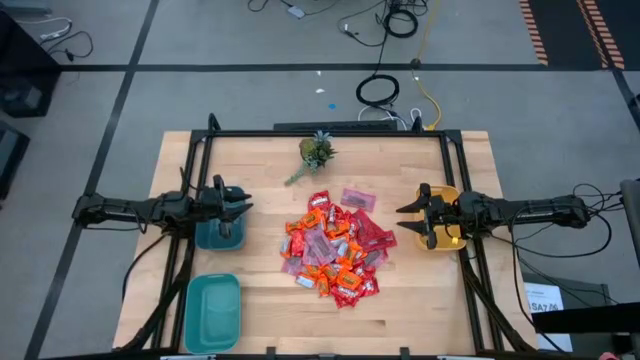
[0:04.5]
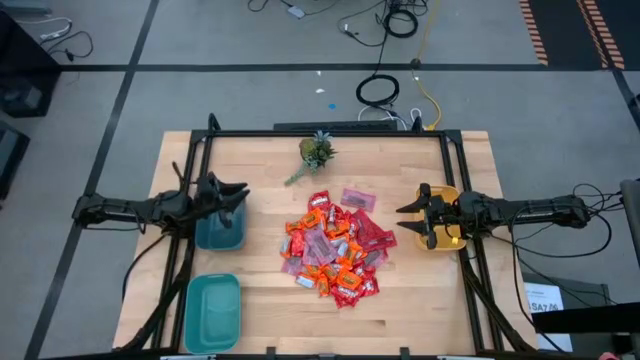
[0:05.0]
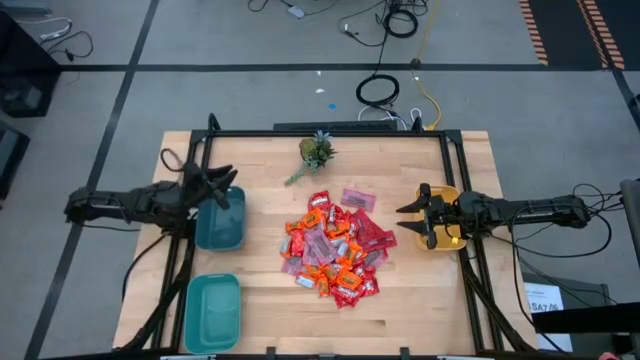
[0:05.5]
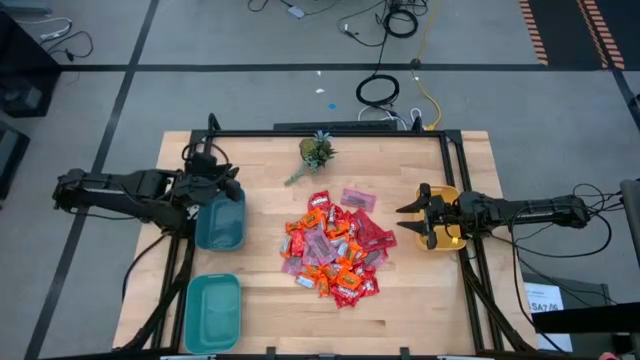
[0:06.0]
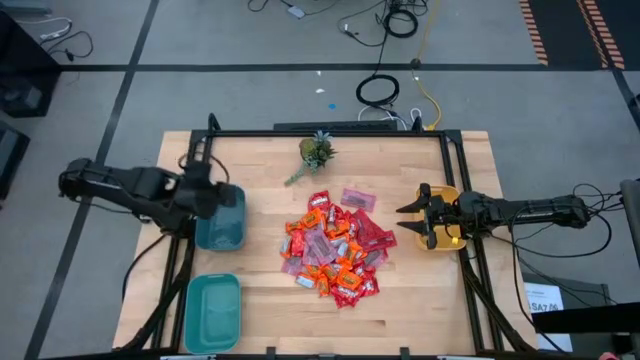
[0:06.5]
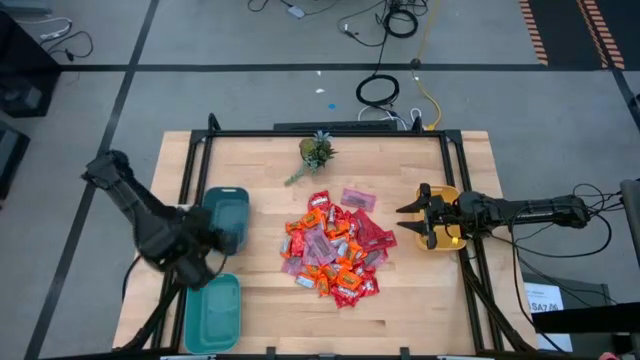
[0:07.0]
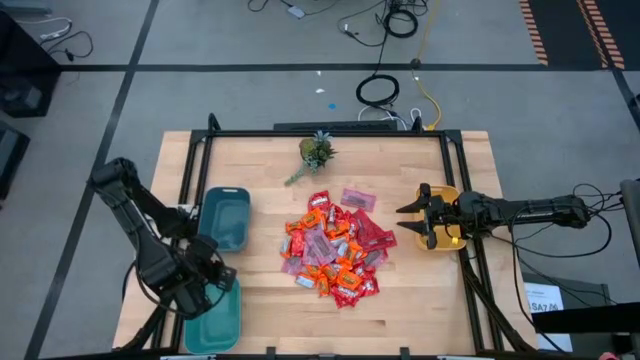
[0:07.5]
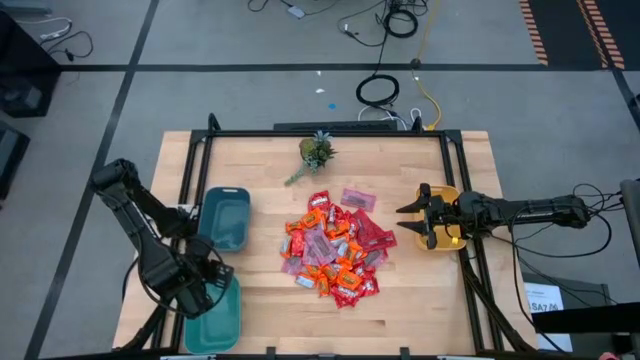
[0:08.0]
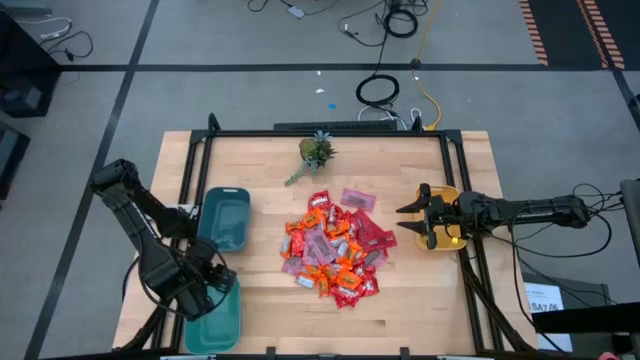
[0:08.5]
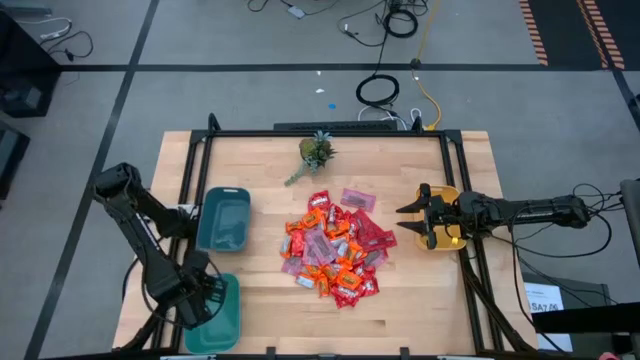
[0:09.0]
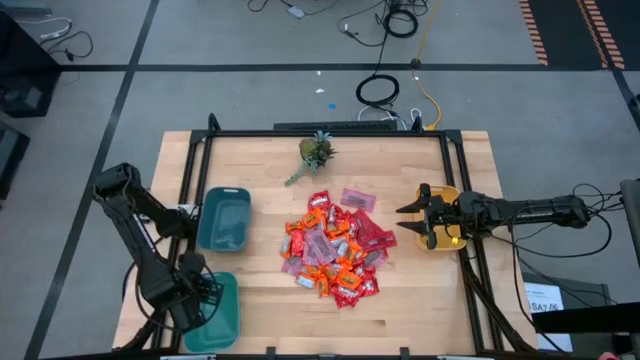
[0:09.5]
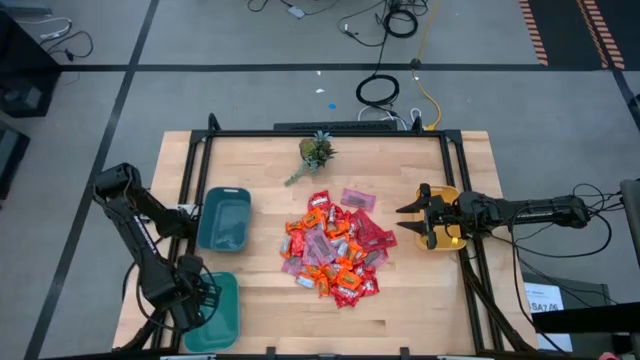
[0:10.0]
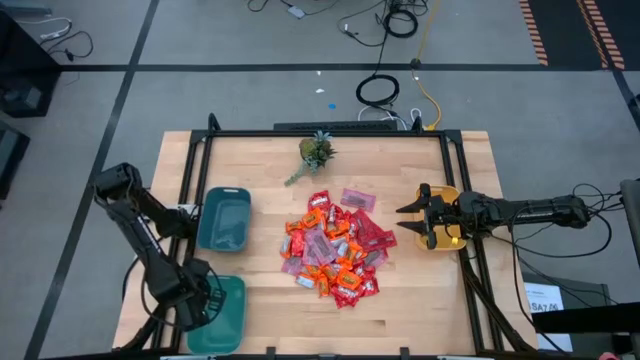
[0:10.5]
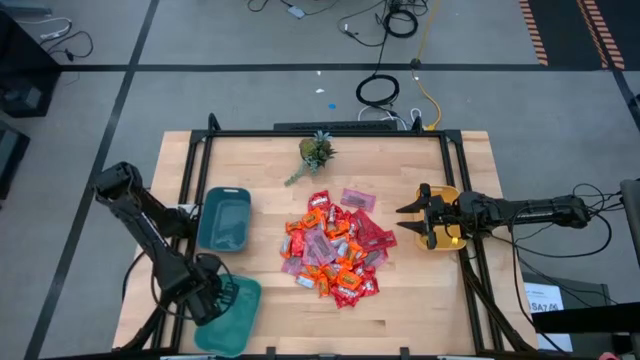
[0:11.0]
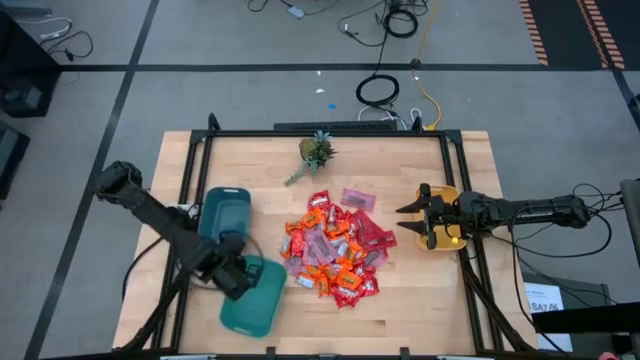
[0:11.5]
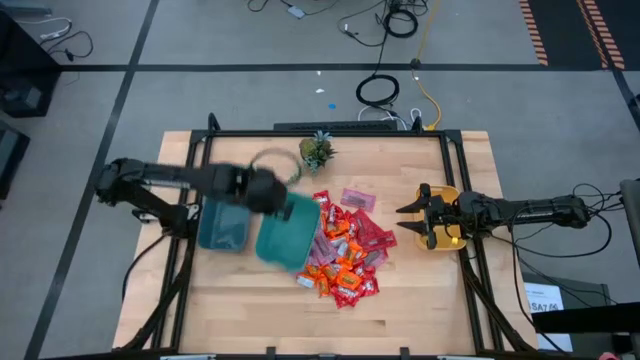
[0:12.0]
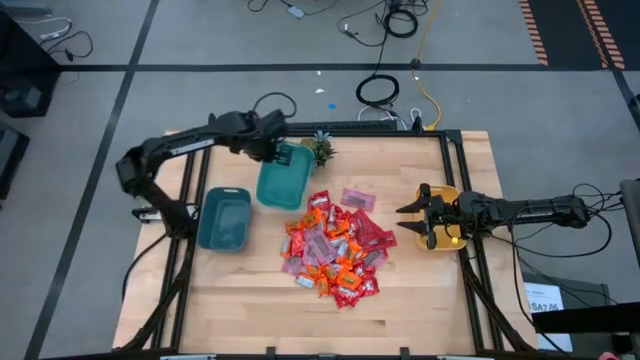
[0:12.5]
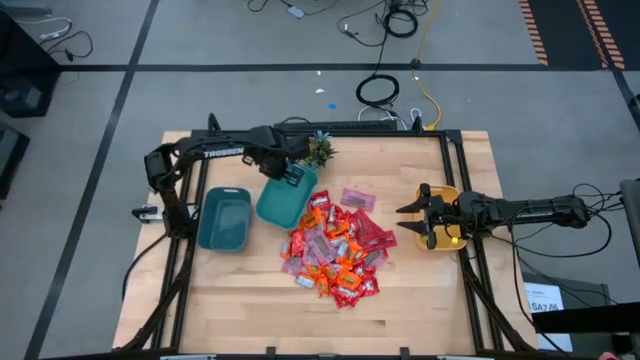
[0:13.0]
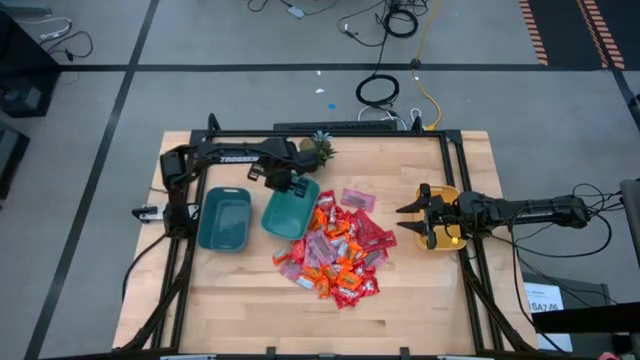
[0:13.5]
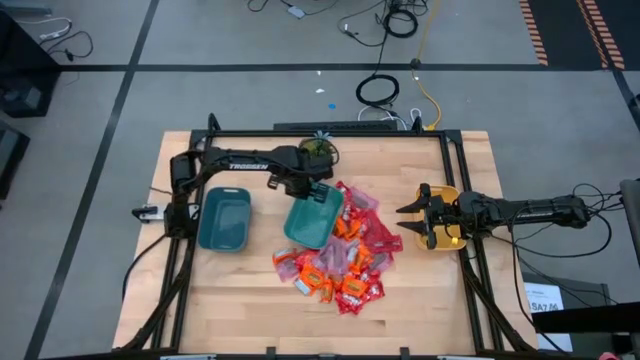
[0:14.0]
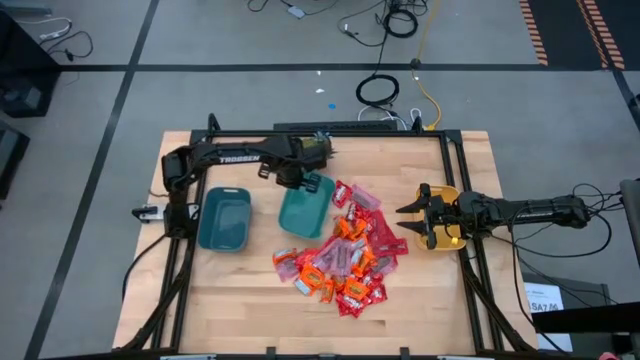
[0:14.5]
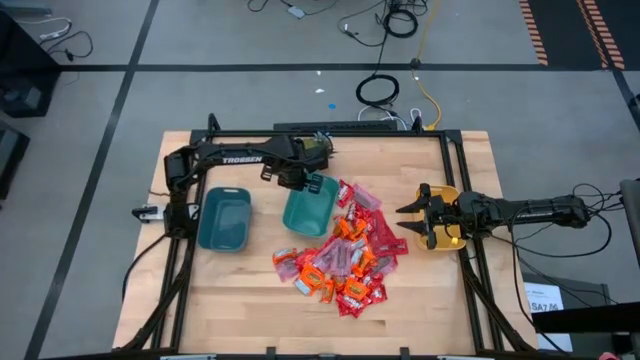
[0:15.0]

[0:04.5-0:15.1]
Task: Sort candy
Move the light blue bin from the bottom to the center of the table

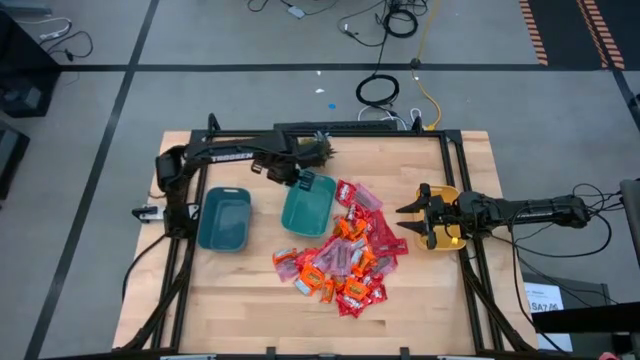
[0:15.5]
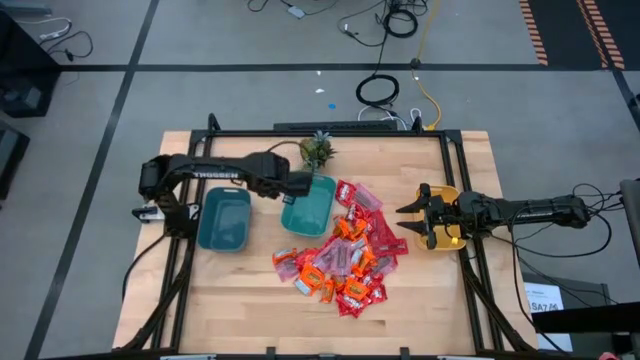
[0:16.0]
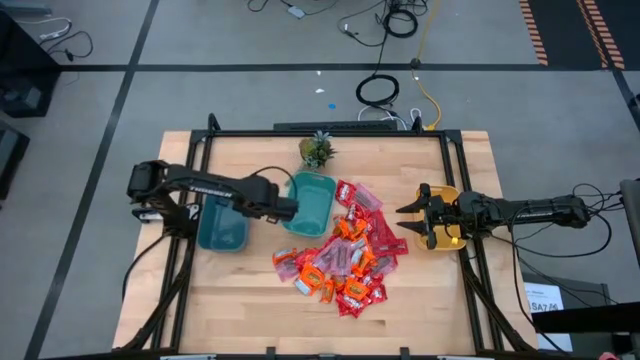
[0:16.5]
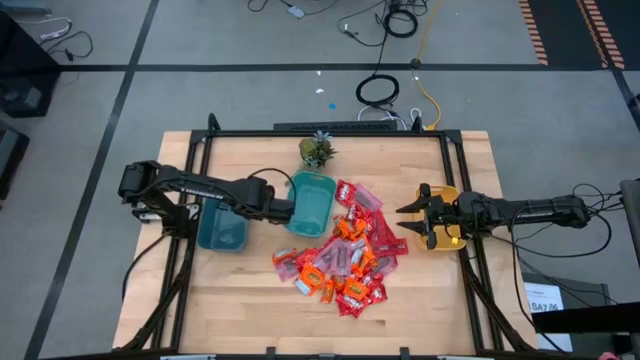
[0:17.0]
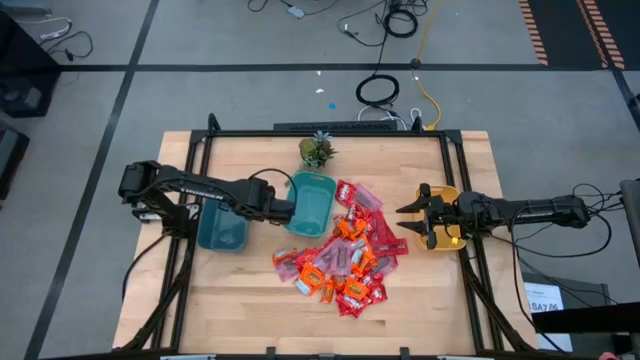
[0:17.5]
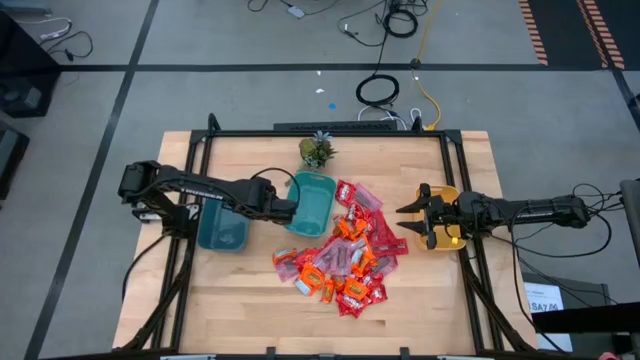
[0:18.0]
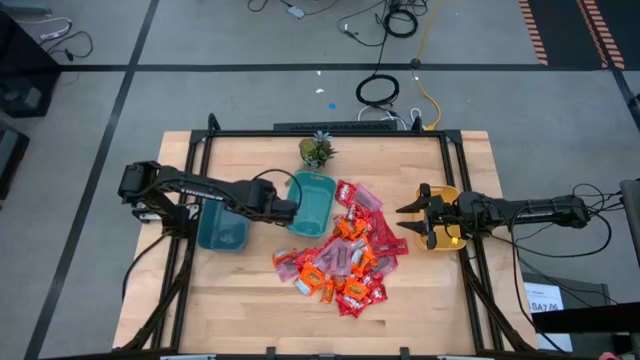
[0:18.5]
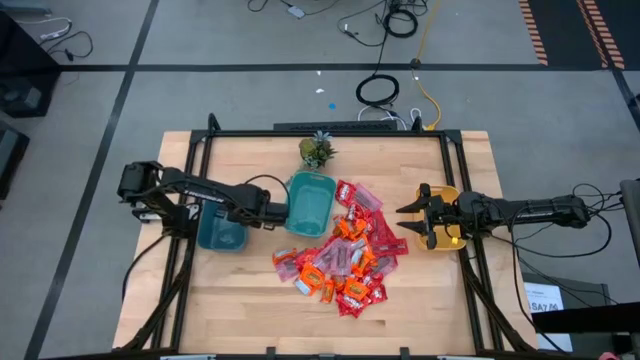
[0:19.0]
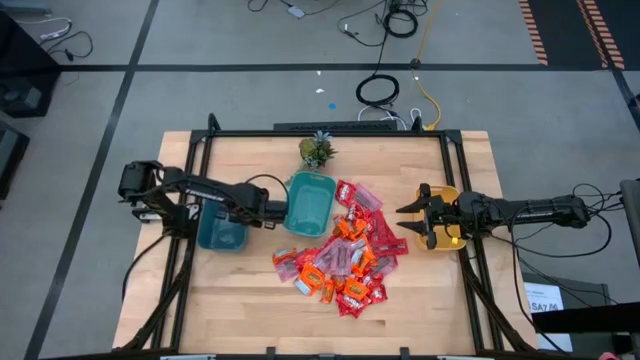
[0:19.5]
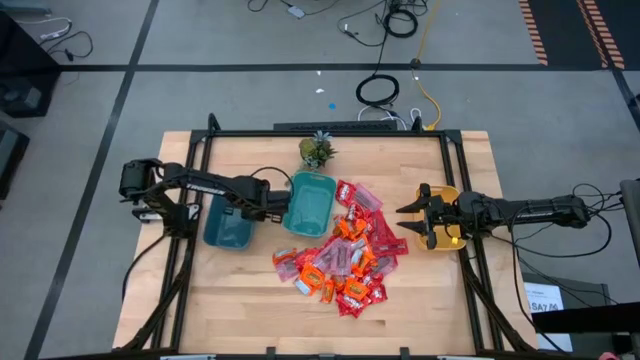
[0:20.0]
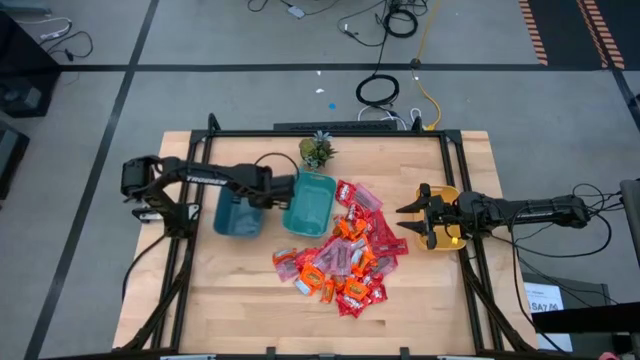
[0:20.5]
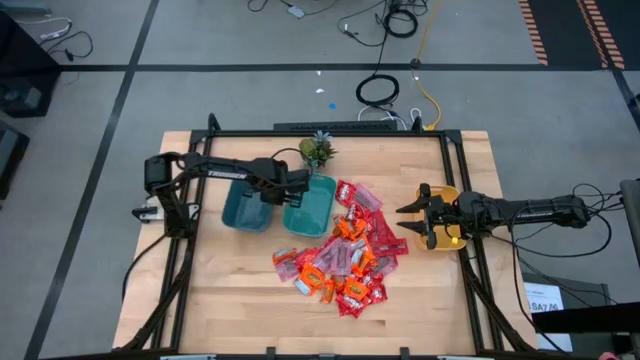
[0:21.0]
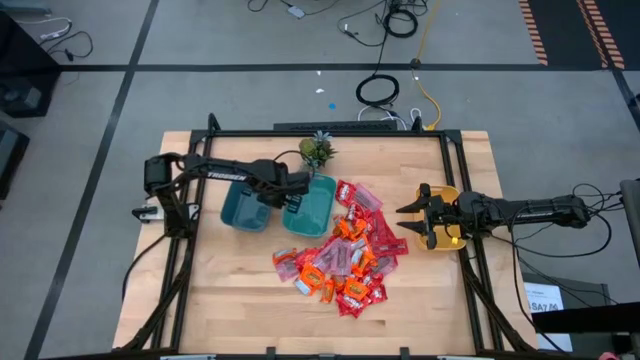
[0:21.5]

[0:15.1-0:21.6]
Adjust the blue bin

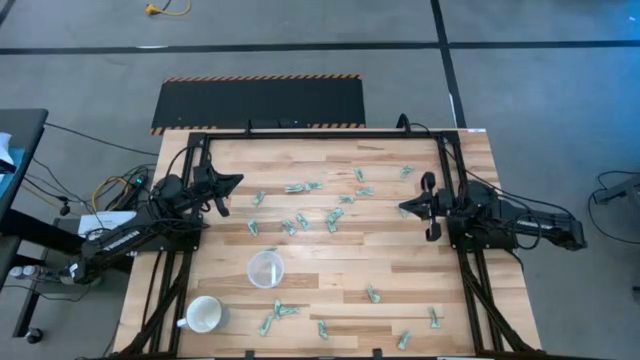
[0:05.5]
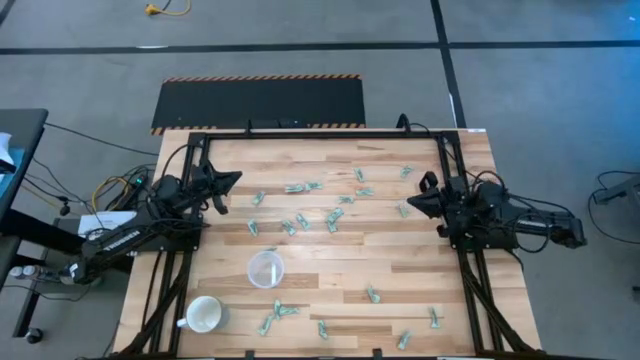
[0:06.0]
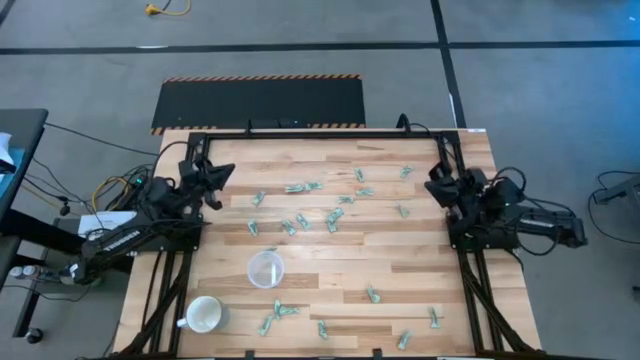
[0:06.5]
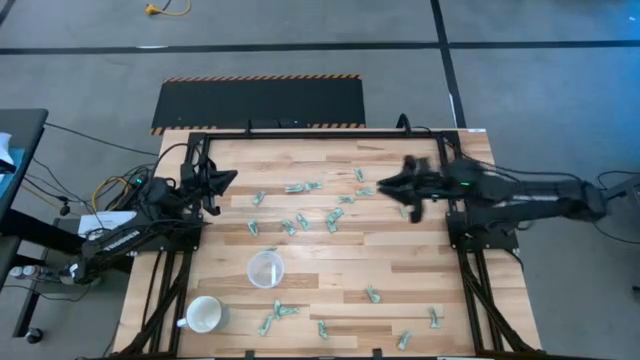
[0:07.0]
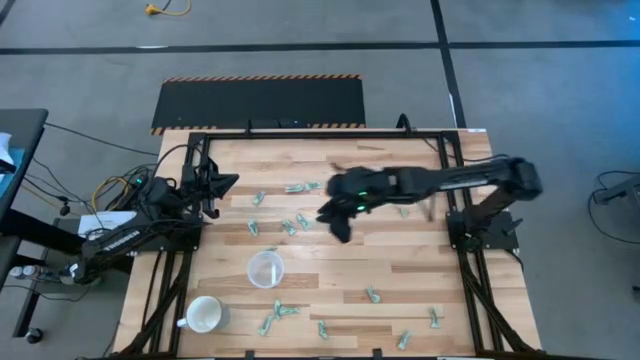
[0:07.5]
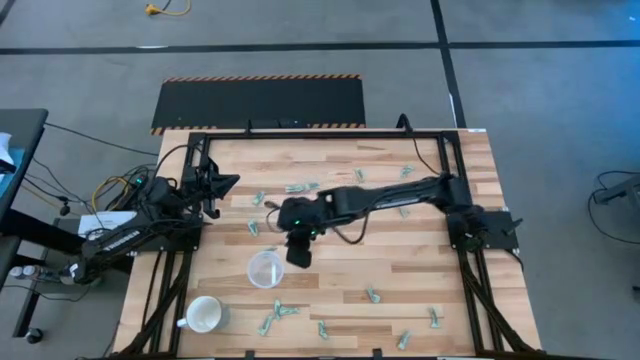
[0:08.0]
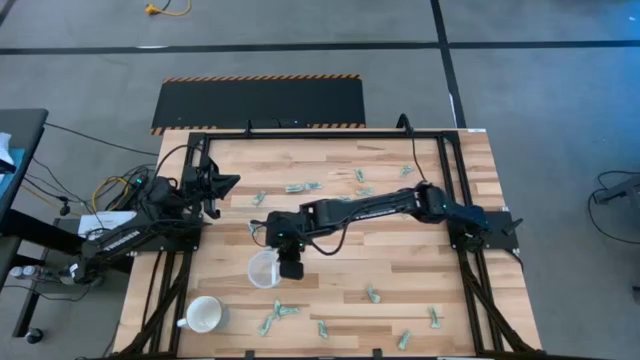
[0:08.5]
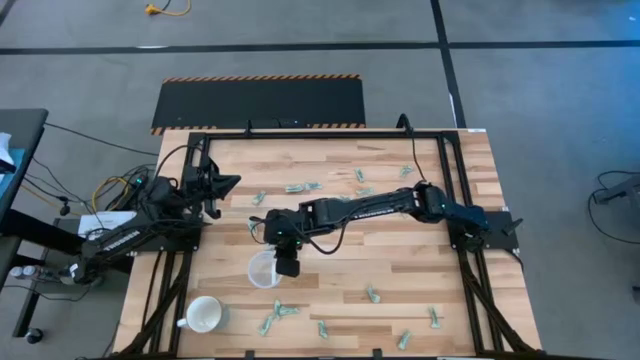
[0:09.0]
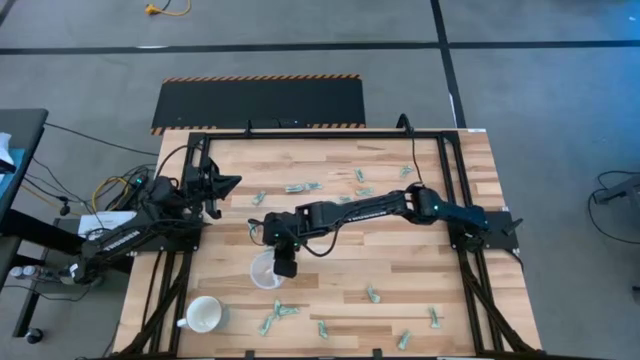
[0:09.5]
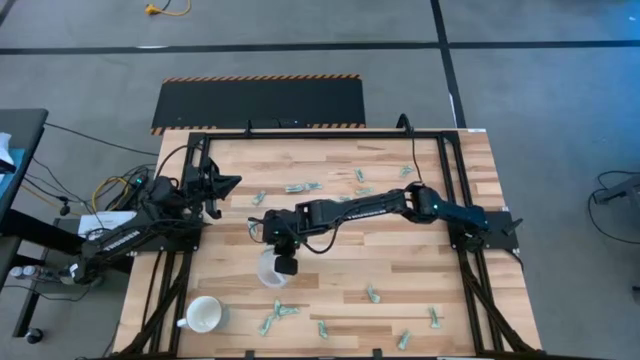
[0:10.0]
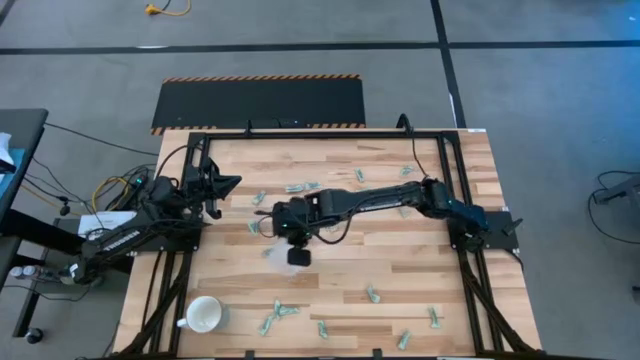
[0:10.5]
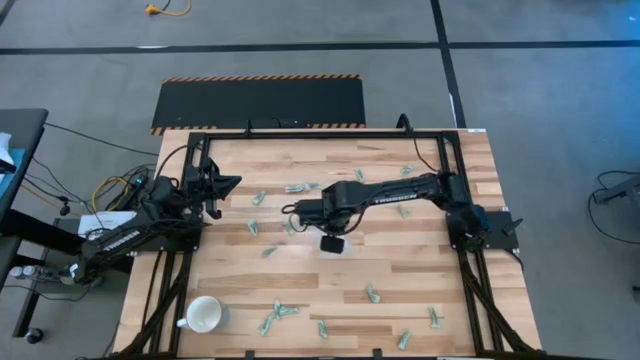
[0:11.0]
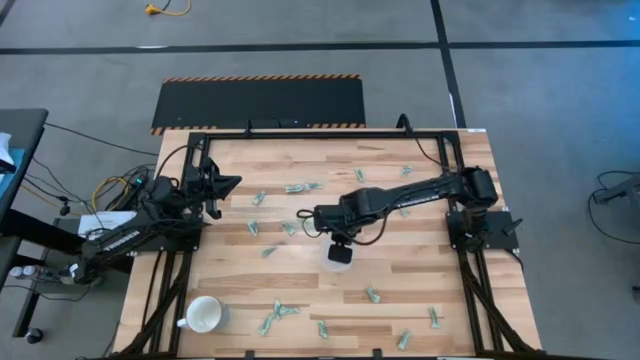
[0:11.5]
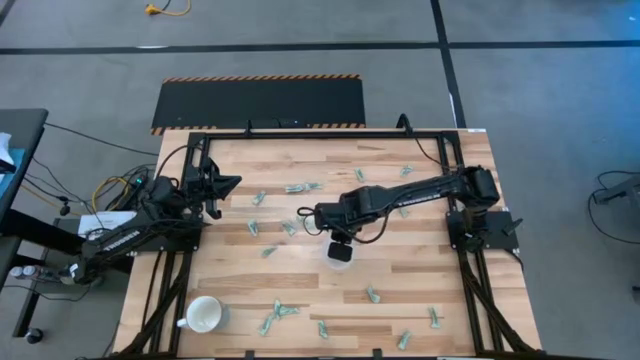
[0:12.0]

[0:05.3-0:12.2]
Task: Pick and place Stevia / Truvia into bins
Move the transparent container to the center of the table
